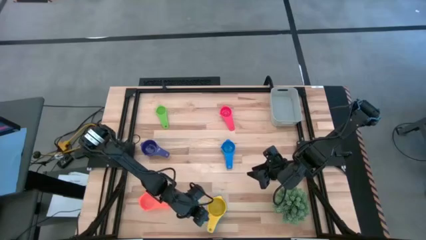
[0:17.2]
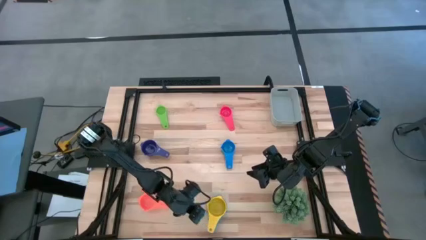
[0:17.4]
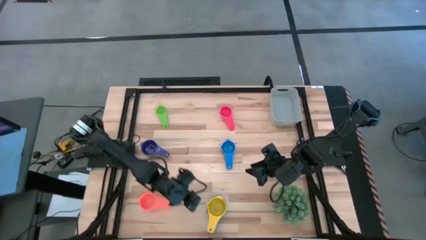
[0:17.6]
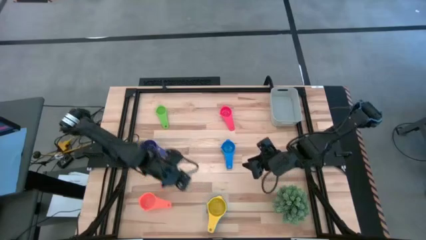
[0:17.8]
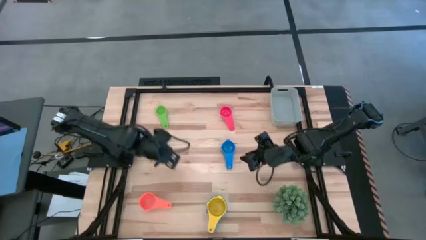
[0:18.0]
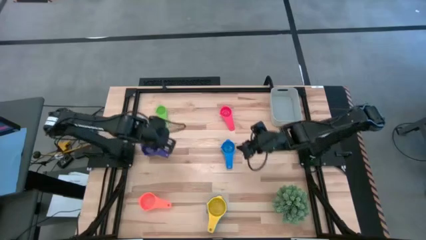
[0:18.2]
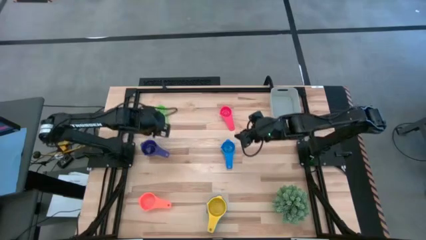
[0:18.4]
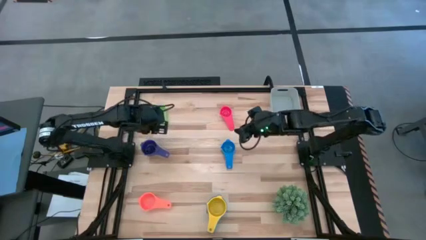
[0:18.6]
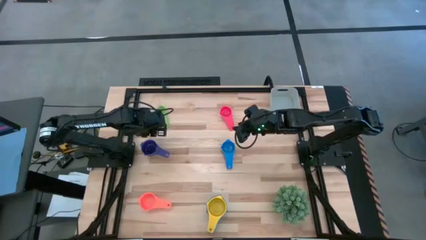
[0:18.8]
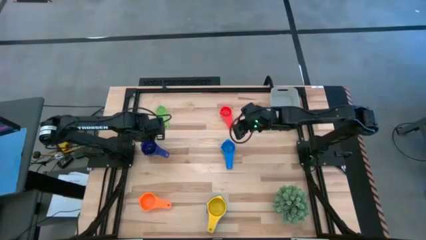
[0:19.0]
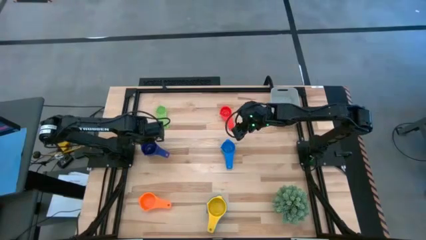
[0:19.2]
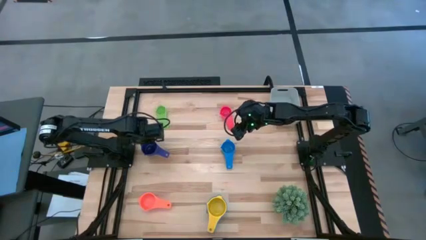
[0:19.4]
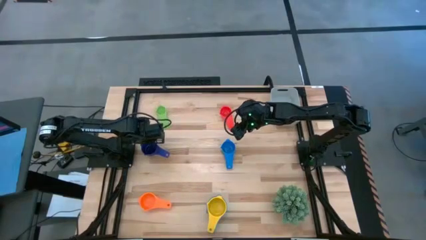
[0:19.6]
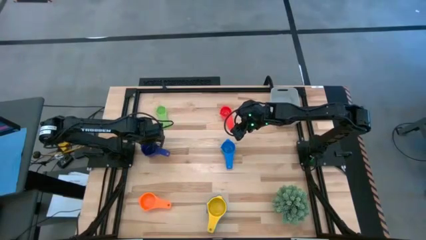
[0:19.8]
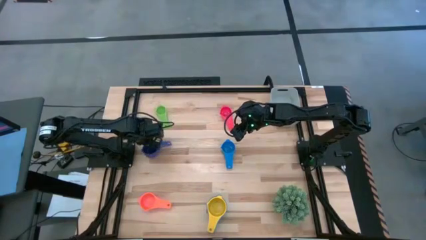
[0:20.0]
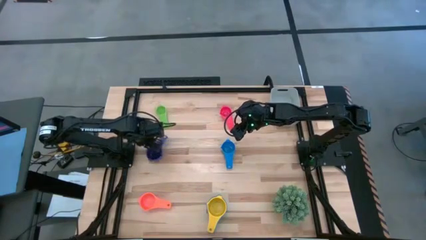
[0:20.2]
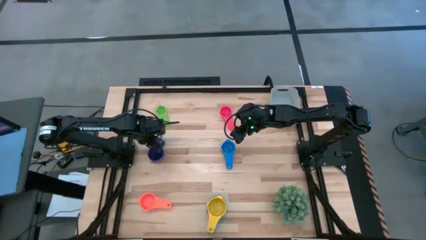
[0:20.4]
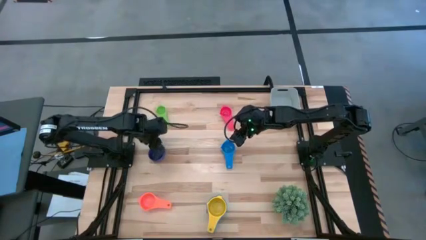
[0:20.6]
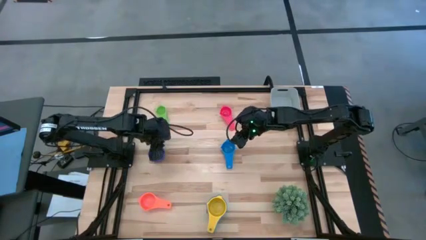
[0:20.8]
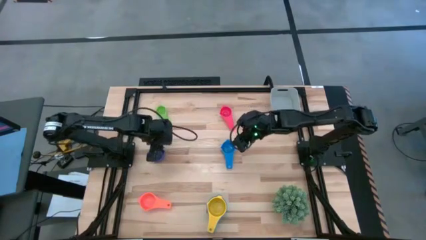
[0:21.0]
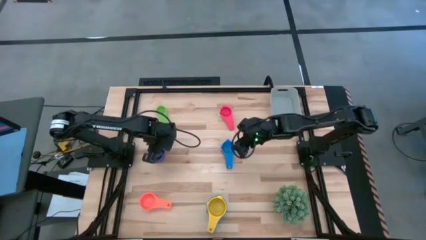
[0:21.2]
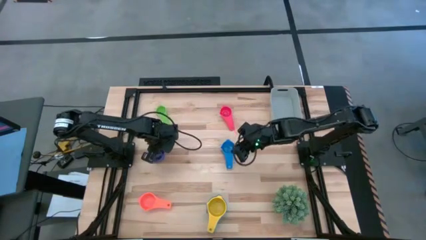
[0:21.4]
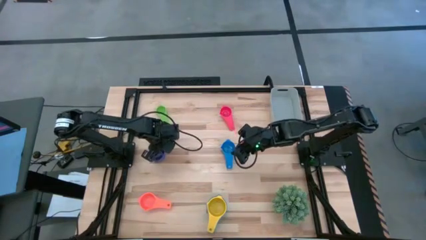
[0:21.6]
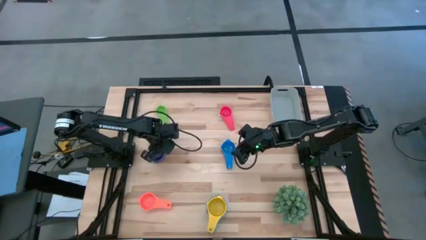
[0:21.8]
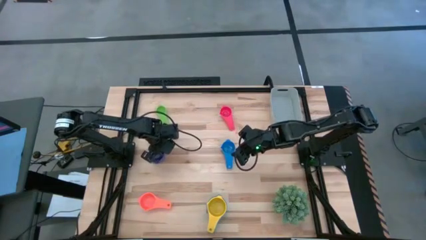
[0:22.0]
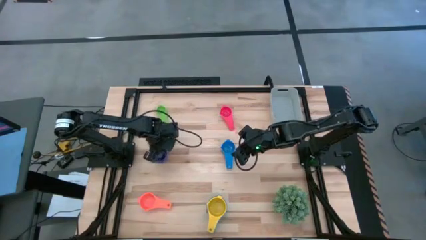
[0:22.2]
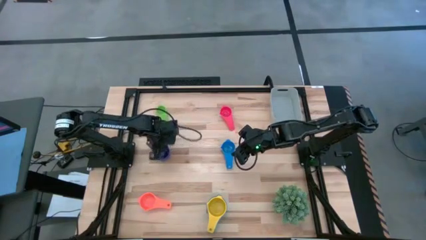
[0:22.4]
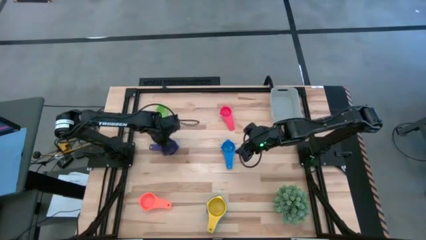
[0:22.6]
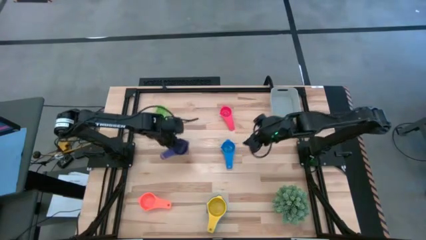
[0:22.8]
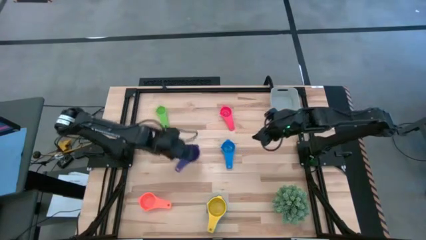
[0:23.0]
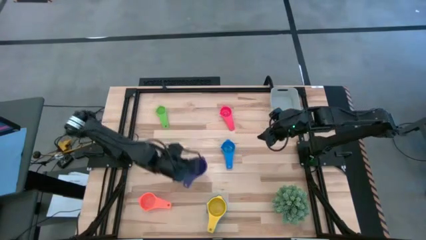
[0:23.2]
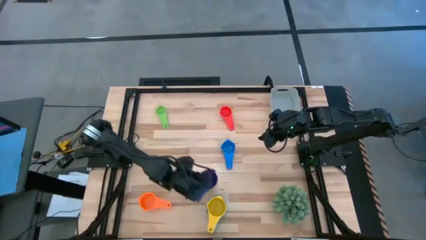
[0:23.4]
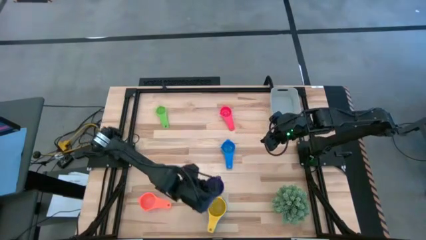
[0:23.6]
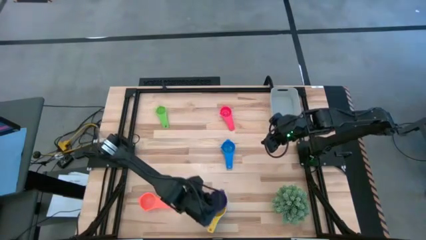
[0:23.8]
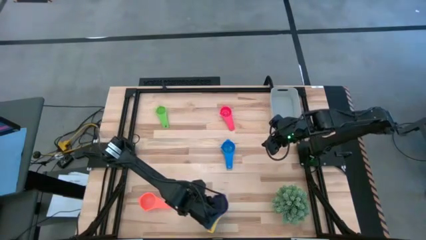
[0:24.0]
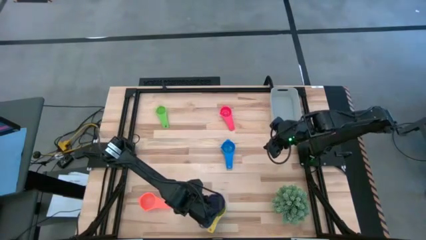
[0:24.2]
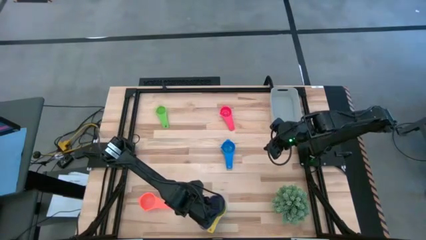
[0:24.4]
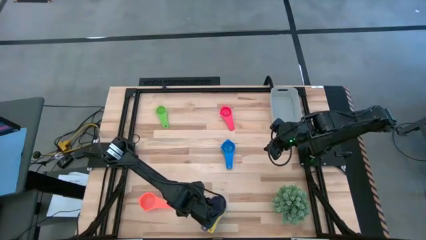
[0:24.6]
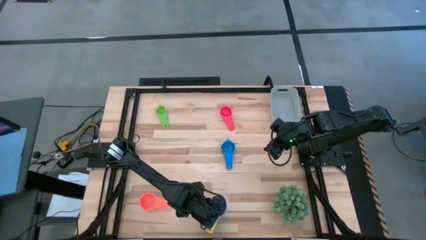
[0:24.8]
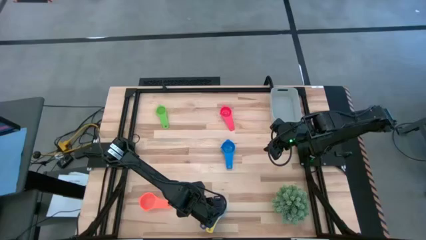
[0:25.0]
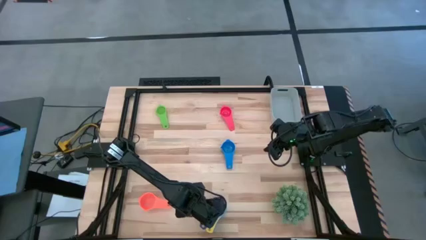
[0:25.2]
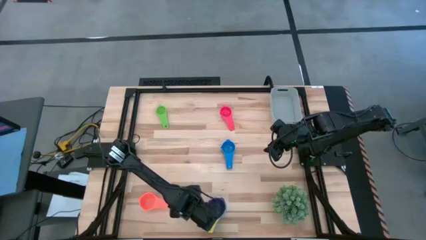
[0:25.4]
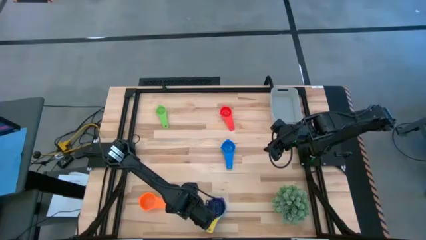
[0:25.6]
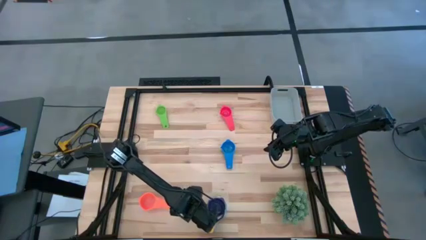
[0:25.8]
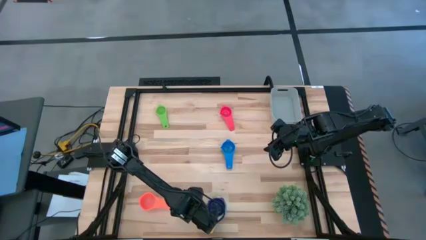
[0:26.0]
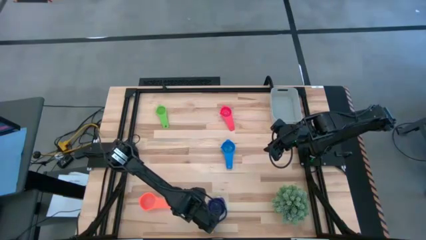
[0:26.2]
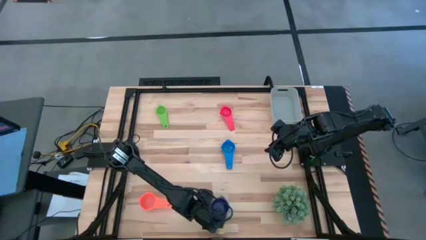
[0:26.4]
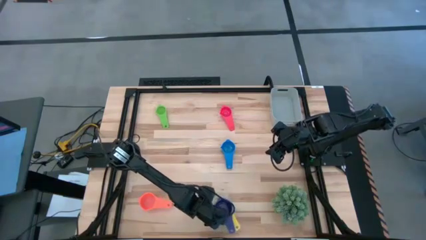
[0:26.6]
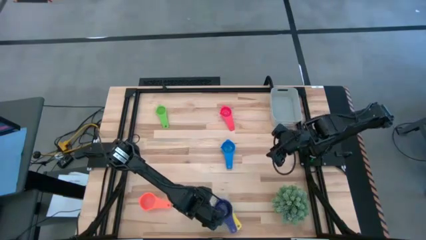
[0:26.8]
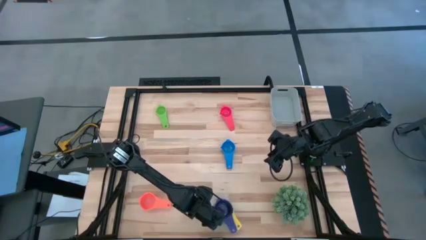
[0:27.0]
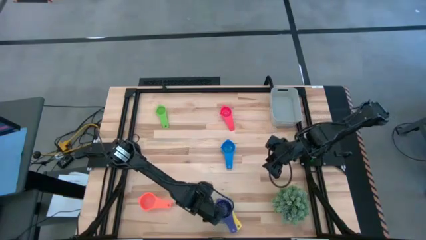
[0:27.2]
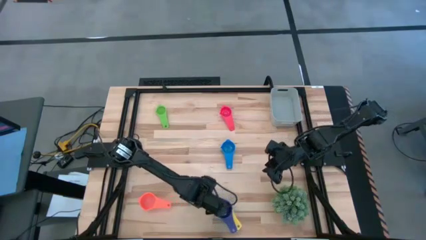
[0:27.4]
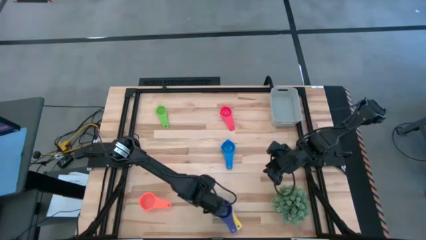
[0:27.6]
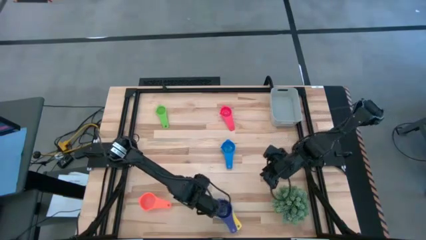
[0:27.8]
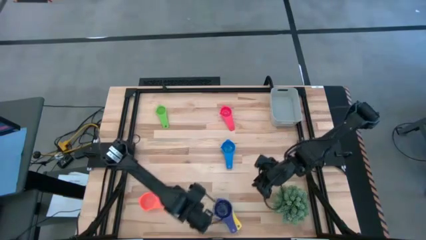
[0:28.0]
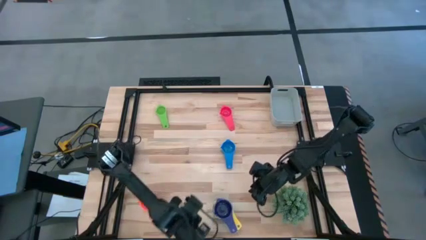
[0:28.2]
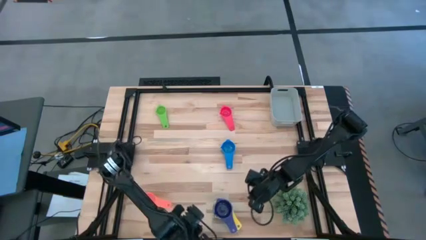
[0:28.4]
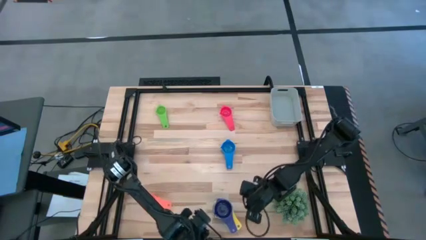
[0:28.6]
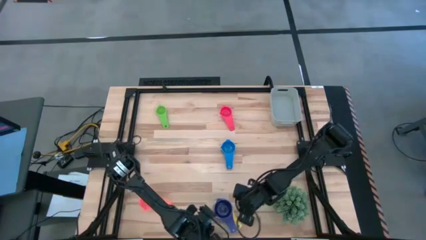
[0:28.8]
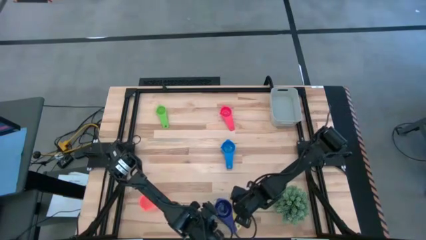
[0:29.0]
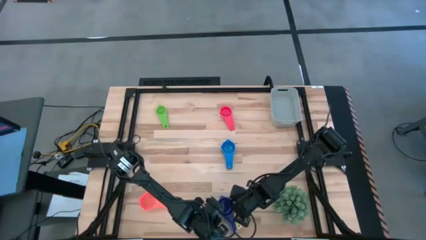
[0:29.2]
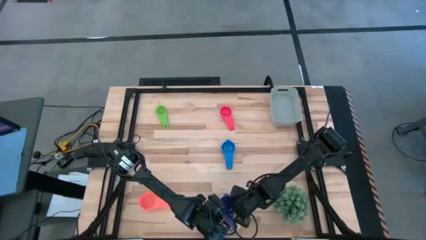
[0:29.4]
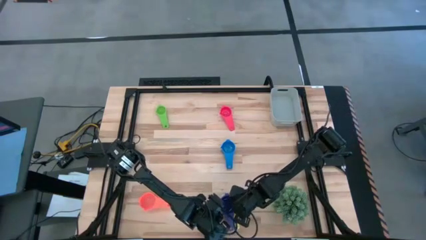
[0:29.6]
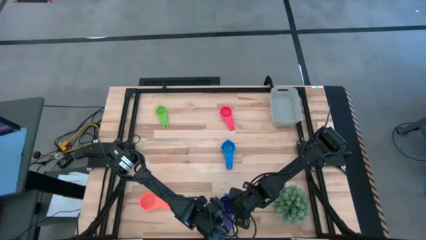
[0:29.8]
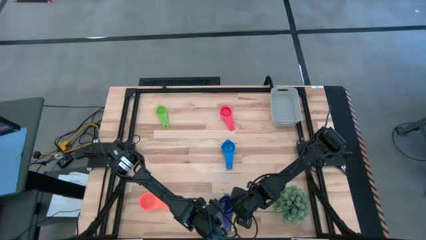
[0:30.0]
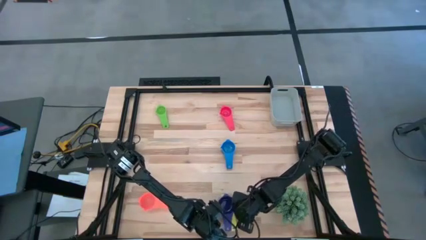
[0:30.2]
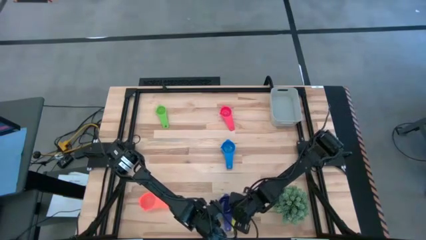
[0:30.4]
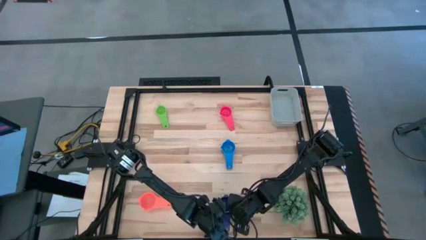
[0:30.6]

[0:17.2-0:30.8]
Task: Nest measuring cups in basket
Stack the dark blue measuring cup on top of the yellow of measuring cup

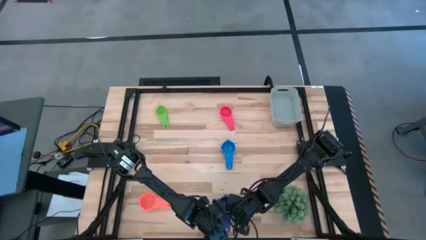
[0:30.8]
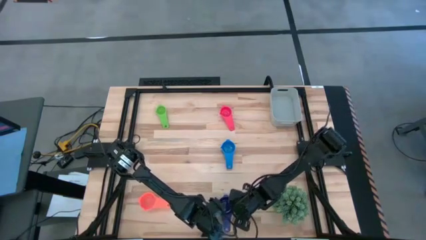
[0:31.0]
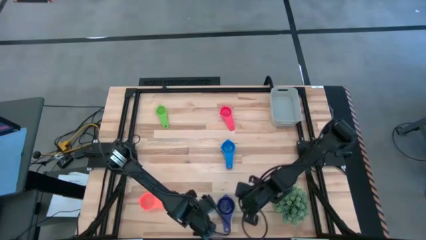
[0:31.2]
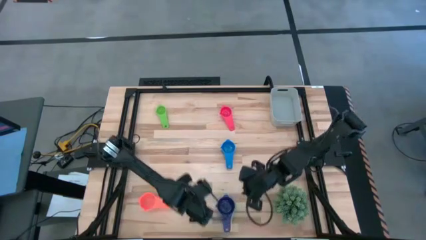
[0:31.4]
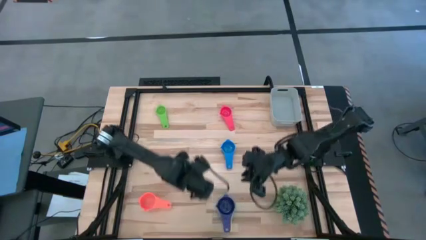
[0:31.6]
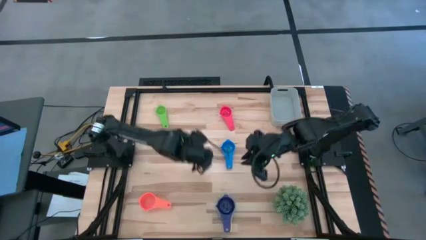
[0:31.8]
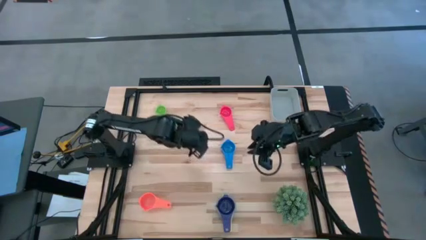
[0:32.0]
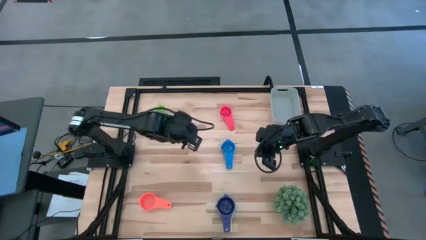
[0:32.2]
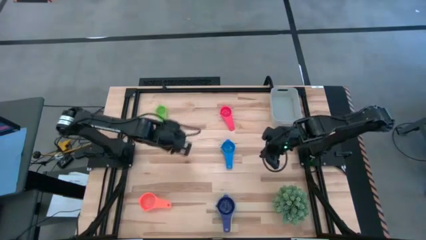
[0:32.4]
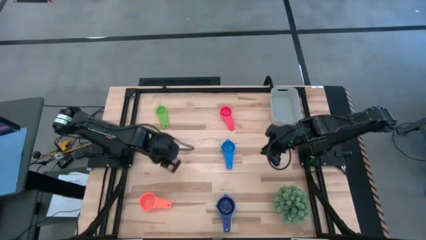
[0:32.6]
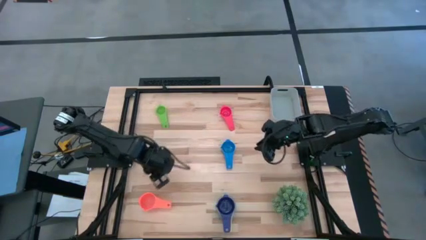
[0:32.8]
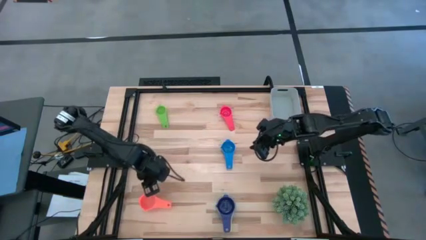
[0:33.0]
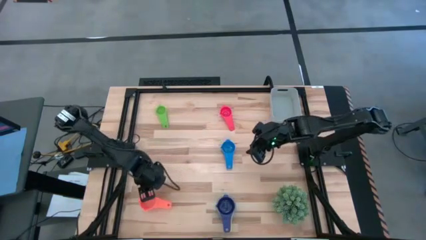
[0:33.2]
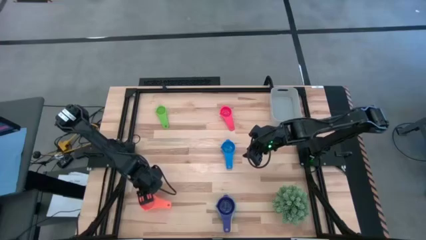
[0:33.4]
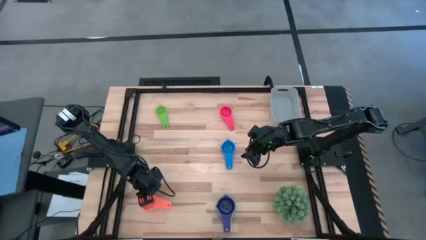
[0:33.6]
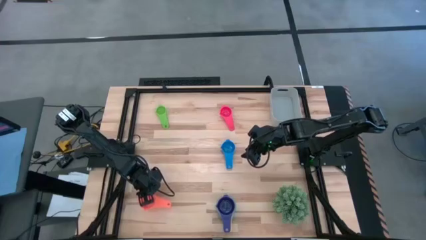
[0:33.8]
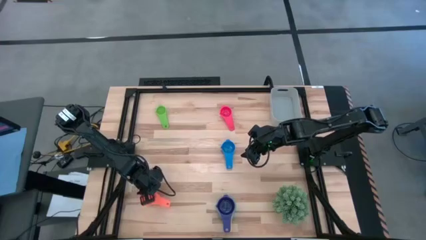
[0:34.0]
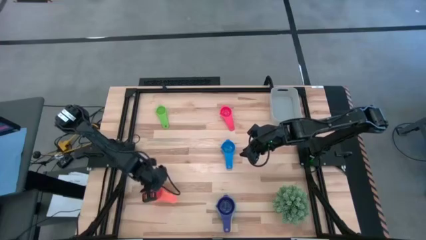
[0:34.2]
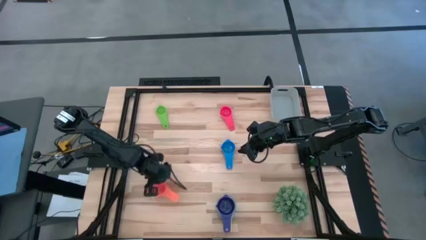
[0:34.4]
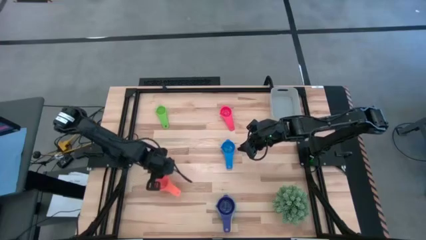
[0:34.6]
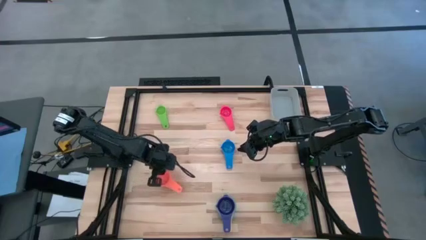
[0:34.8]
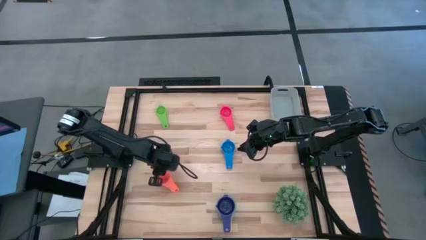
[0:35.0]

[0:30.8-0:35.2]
Stack the orange measuring cup on top of the dark blue of measuring cup
